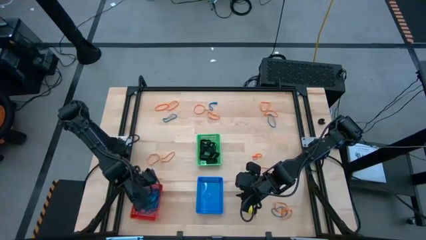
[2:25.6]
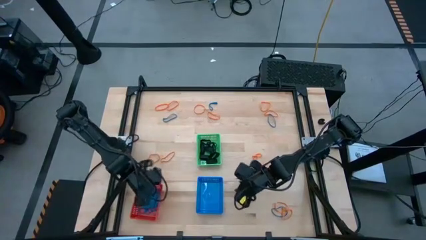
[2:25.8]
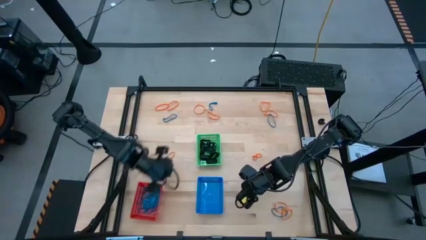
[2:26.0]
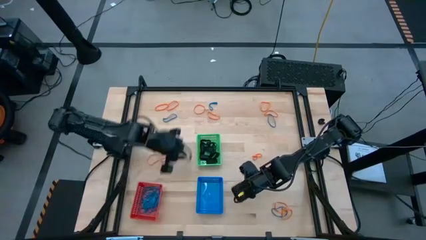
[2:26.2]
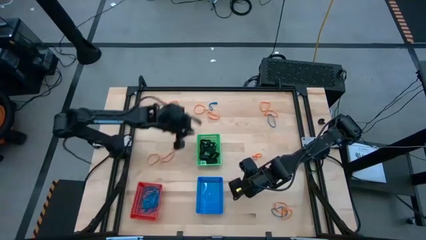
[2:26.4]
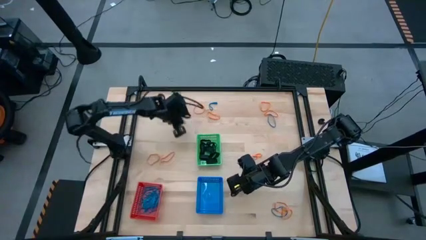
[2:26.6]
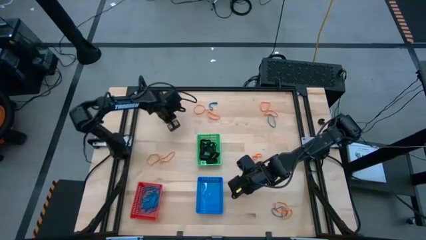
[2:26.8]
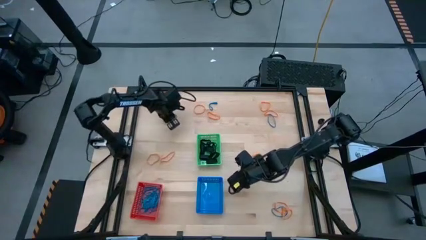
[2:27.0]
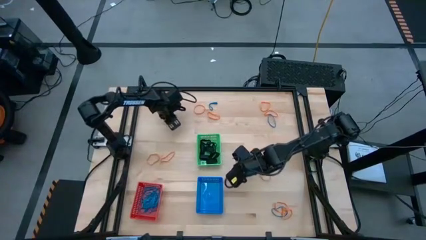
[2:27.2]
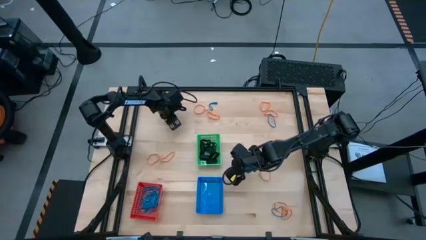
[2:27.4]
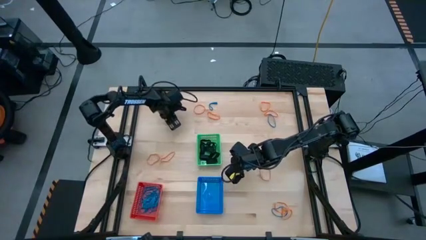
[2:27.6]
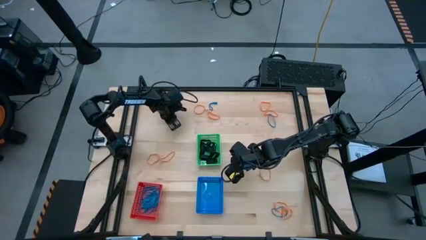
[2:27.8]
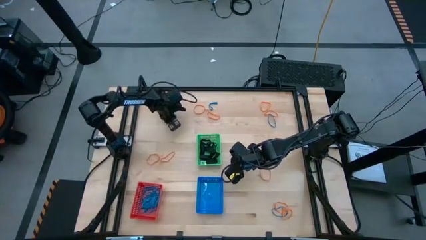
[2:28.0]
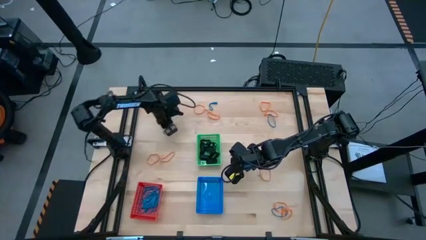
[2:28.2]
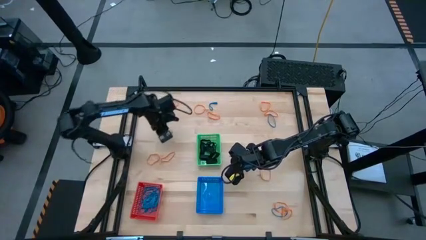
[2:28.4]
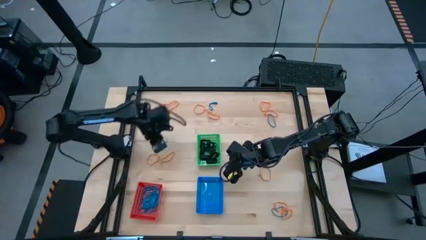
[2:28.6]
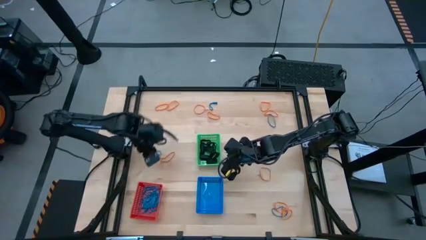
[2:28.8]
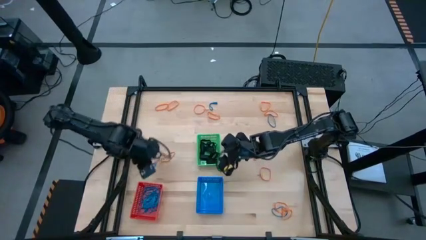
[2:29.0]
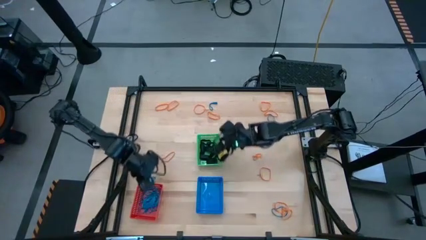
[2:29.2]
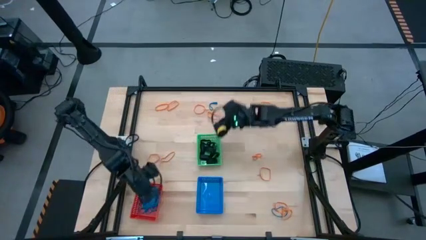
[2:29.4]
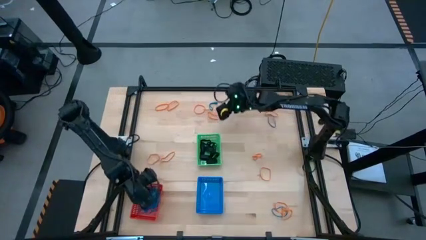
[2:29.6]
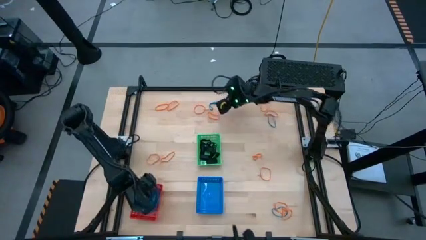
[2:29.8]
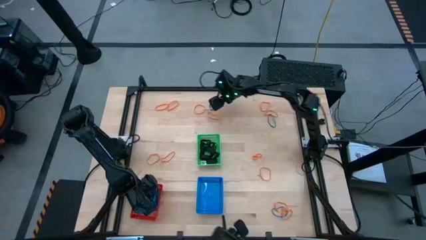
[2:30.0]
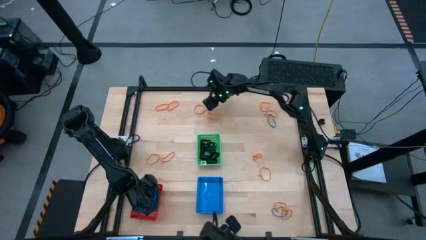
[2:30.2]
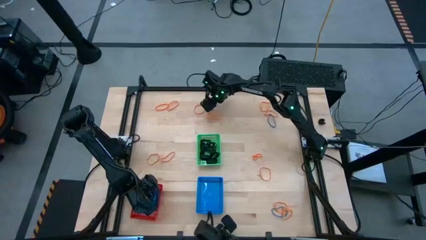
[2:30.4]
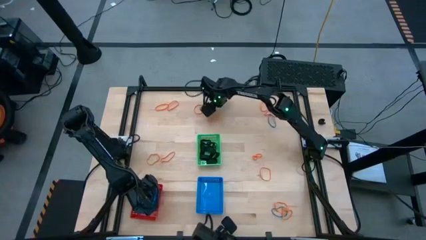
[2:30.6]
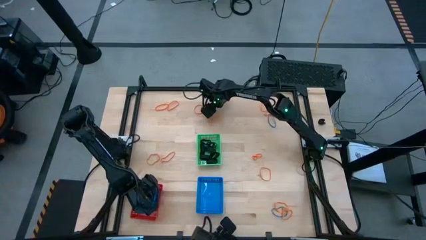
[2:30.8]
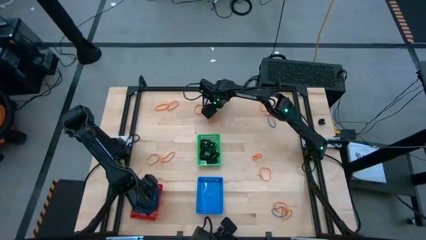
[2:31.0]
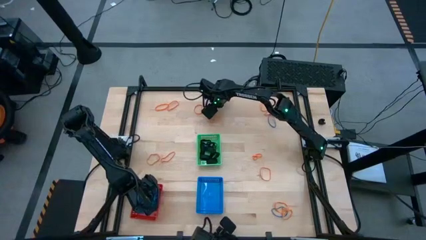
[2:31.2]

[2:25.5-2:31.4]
Task: Sort rubber bands into baskets
Put the blue rubberband into the red bin

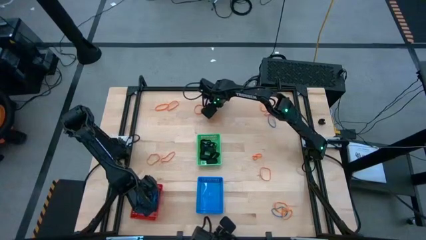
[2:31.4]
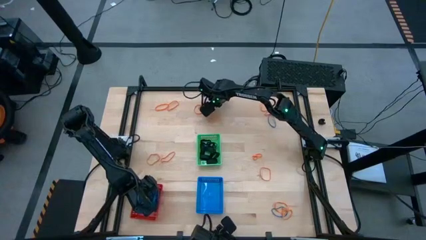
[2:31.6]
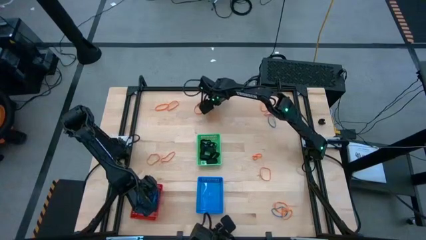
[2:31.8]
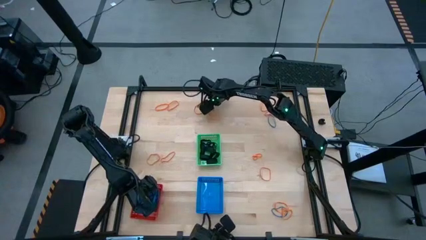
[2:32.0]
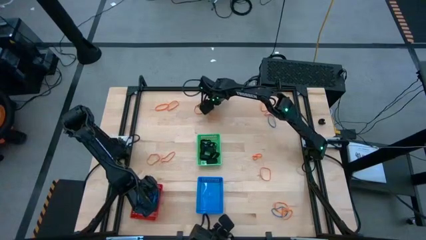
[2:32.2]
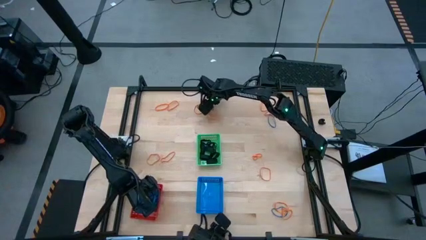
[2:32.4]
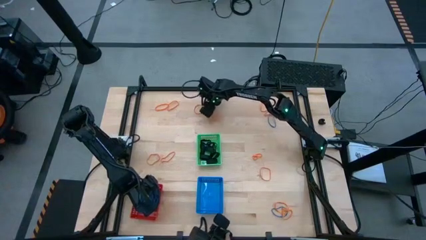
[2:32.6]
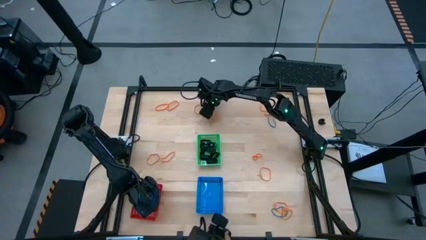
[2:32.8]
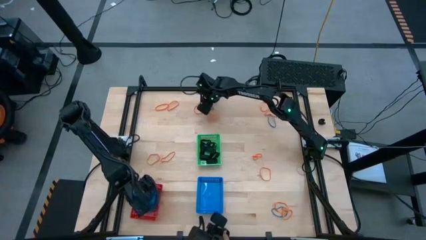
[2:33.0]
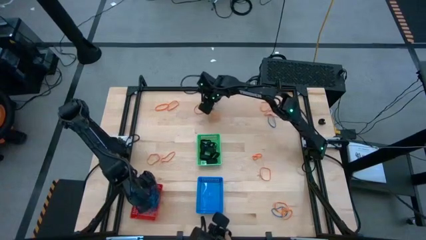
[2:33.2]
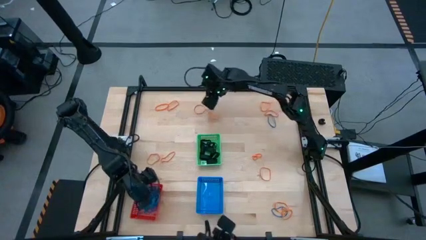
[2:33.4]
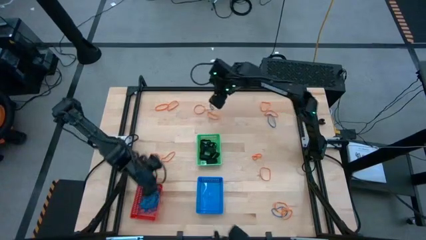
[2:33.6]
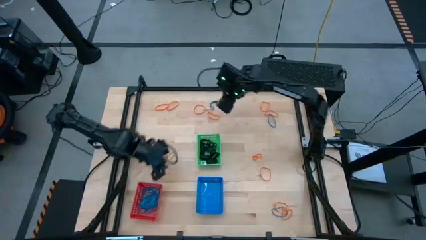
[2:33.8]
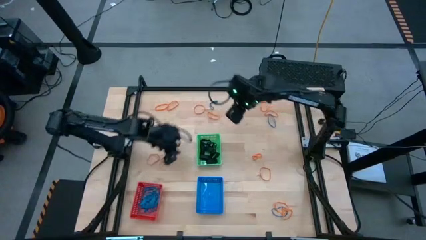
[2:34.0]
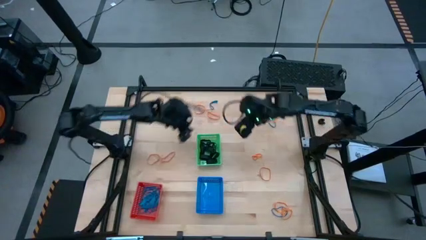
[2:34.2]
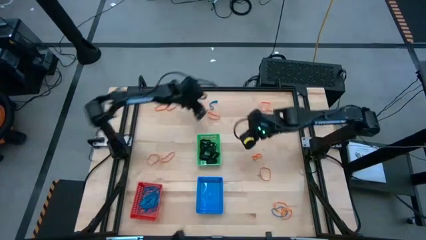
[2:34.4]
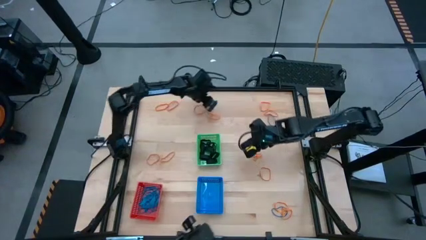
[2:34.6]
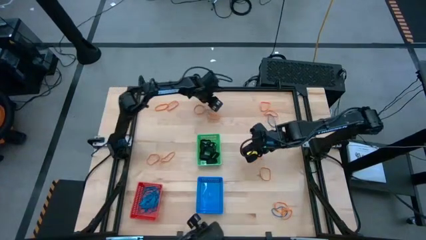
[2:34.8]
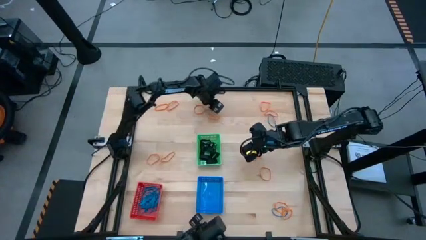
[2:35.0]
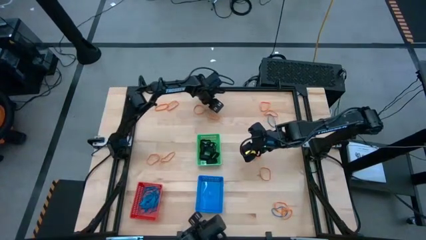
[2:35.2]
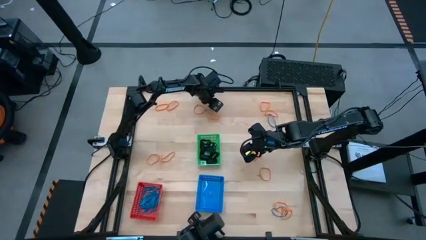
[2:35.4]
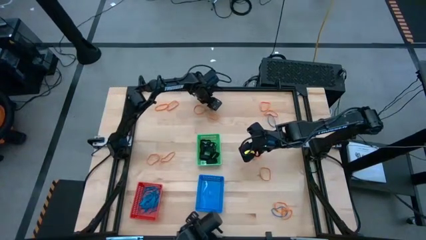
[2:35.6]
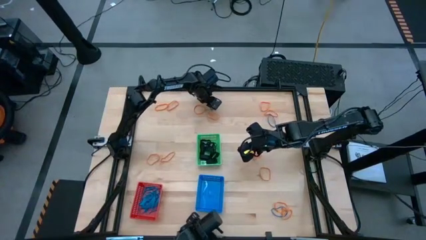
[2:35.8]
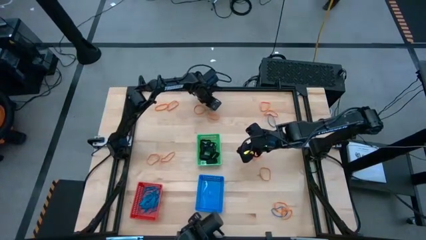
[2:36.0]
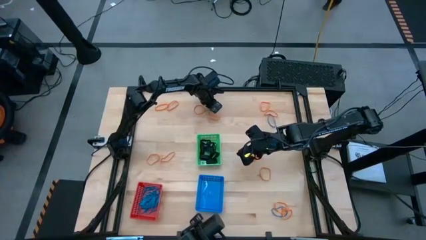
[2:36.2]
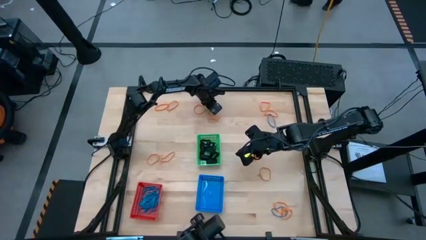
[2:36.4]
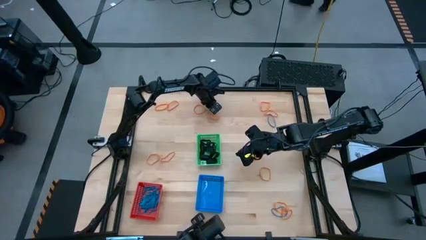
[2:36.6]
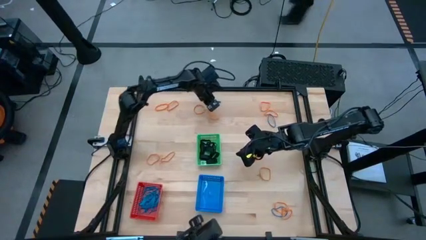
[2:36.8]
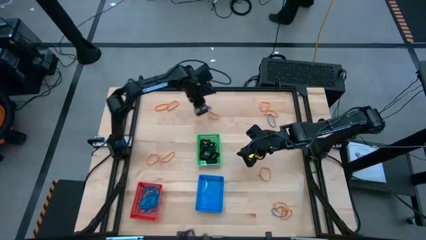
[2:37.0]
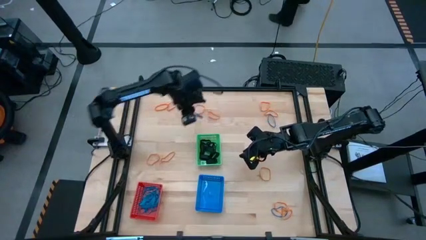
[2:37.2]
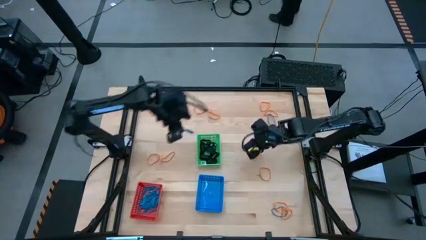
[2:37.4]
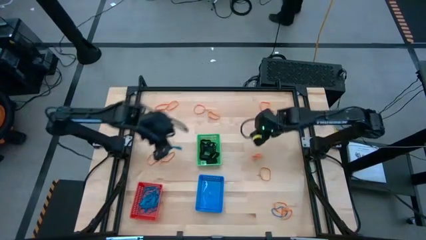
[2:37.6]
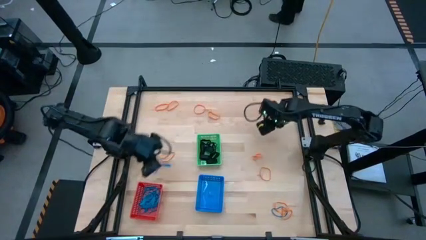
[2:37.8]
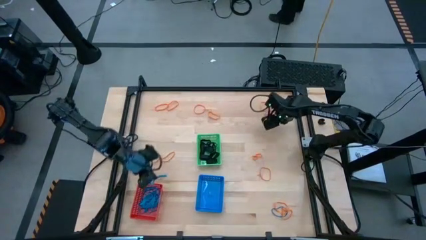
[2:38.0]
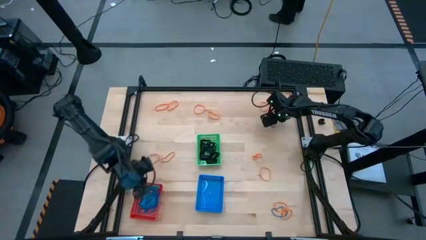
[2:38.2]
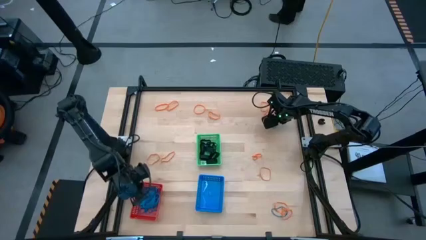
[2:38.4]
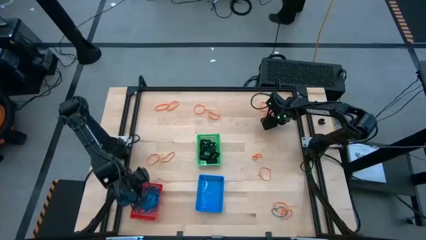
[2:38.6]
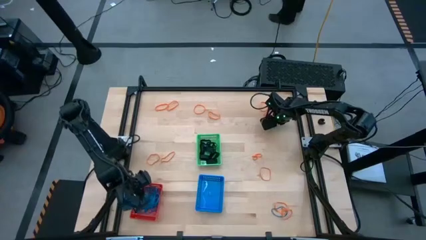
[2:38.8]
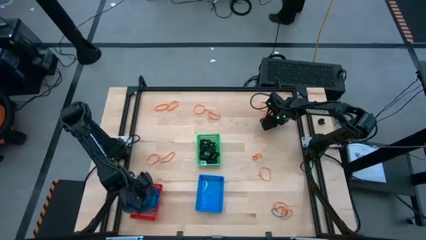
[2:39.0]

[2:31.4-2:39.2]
Put the blue rubberband into the red bin

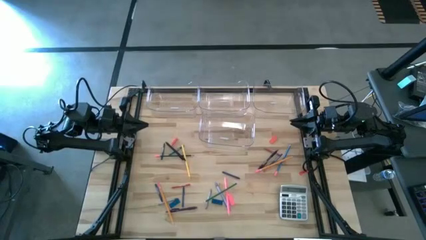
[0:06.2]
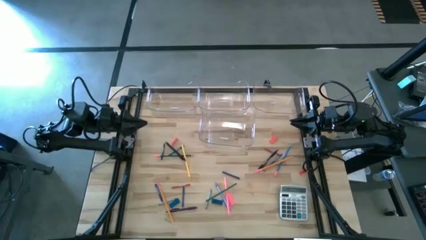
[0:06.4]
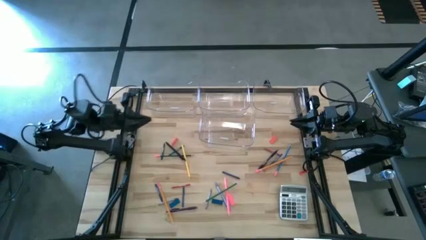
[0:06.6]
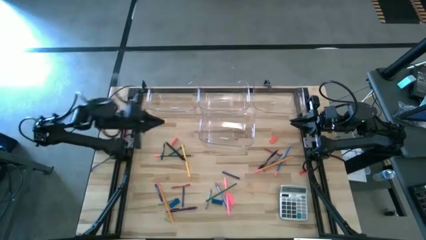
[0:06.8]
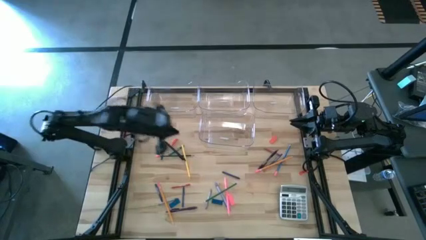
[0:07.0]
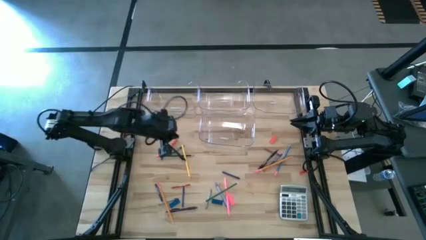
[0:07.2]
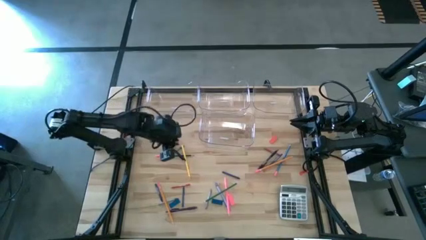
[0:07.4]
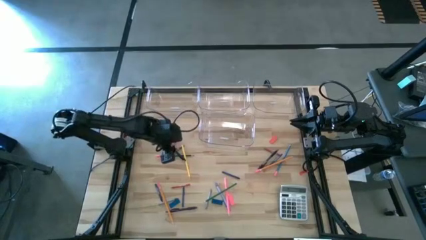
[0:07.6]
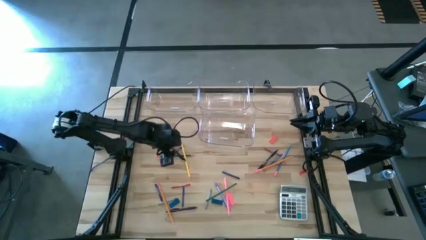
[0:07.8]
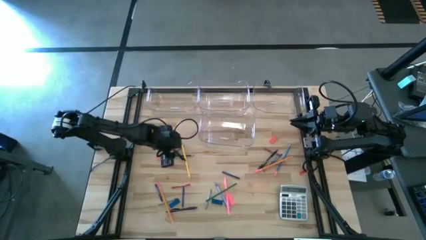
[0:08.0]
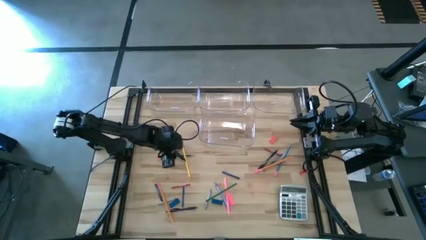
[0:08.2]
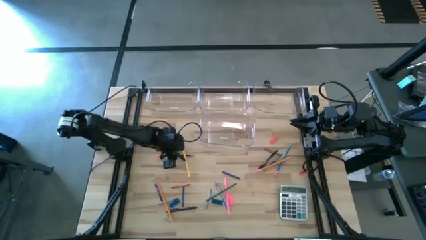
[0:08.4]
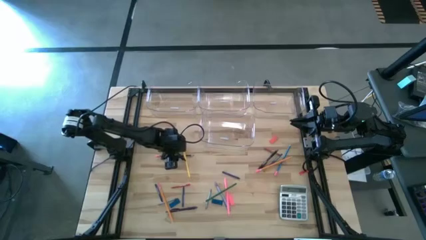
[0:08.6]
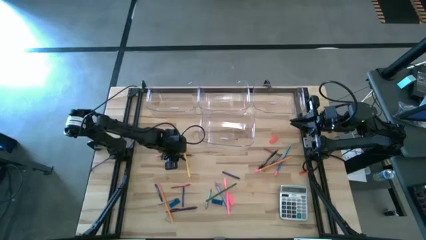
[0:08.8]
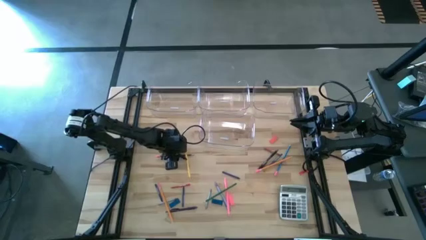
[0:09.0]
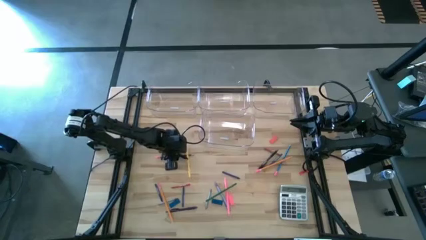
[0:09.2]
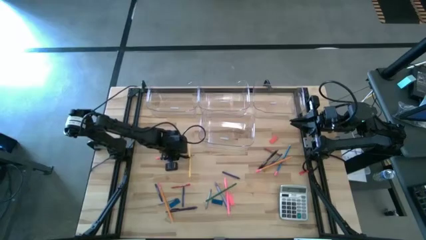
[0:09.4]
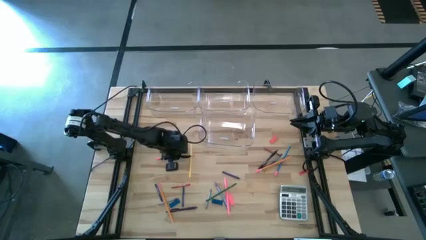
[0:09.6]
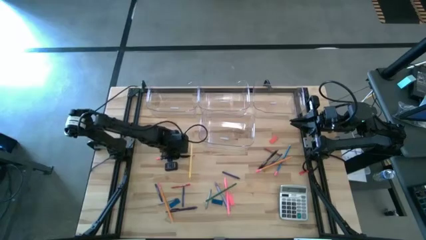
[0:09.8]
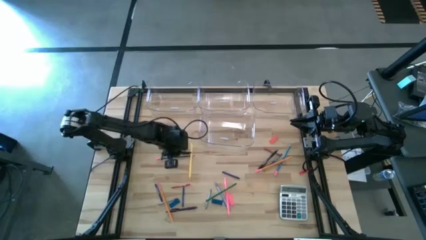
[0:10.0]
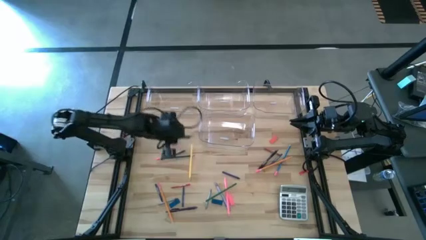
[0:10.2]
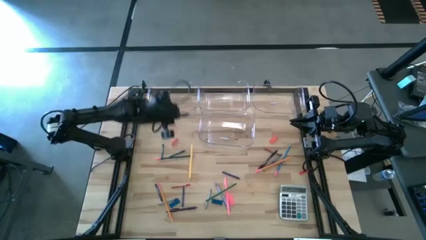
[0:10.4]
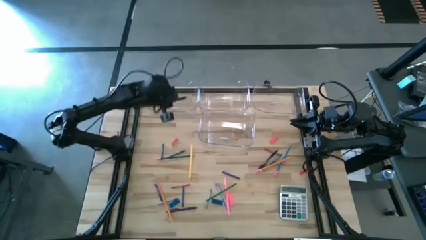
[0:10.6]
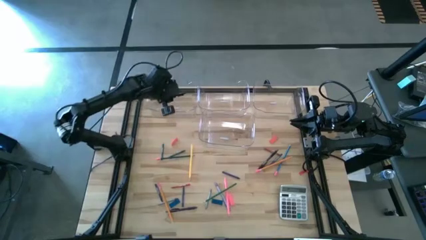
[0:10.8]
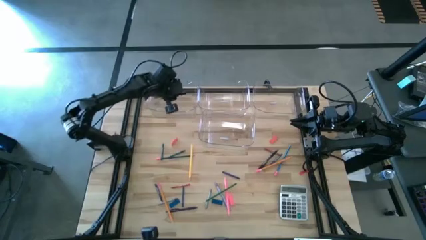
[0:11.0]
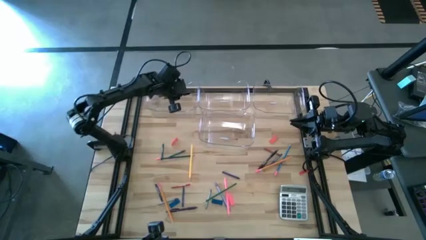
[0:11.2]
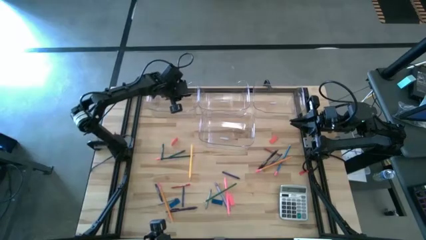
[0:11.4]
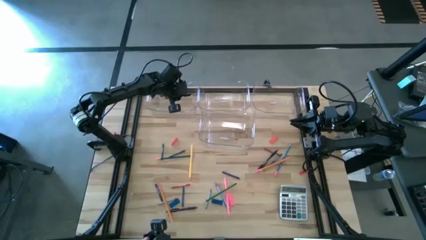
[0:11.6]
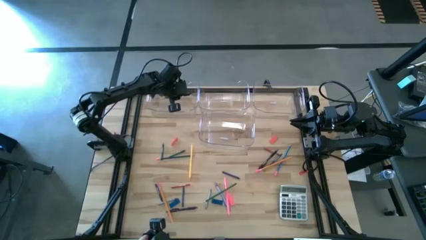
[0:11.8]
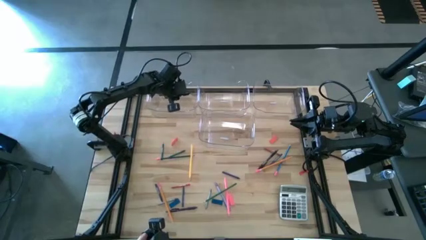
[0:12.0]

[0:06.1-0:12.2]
Task: Sort crayons/erasers/pens/pencils in bins
Put the black pen into the top left transparent bin
